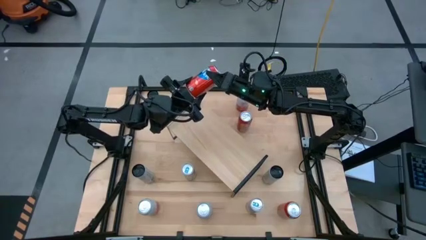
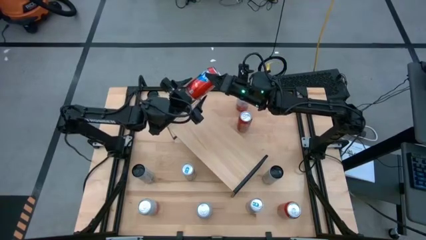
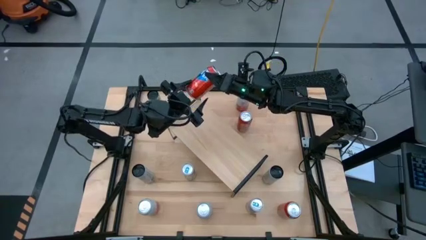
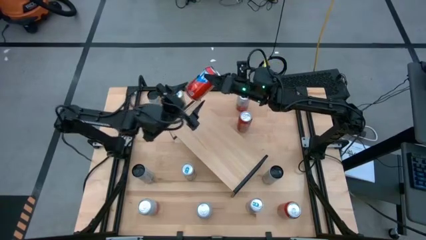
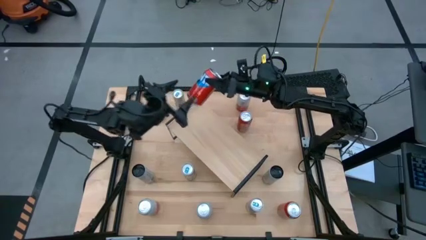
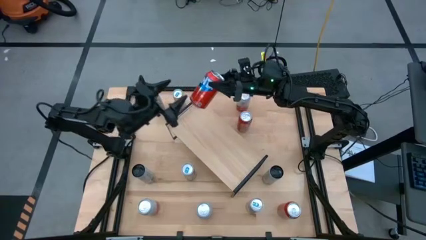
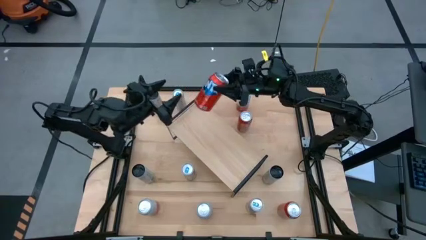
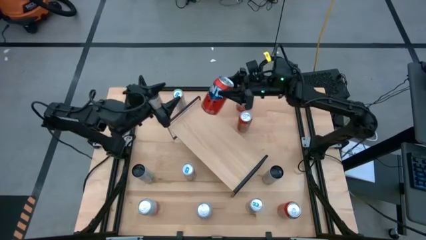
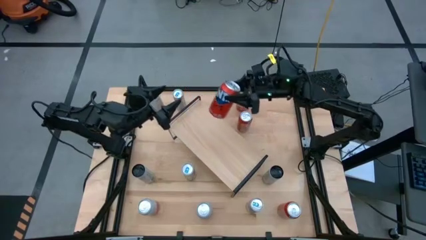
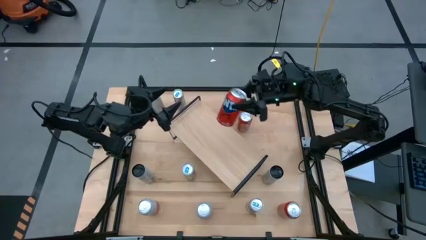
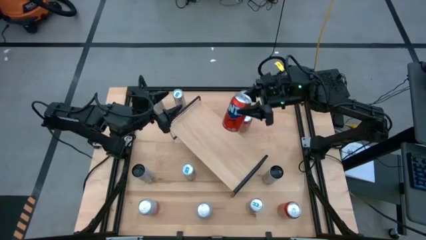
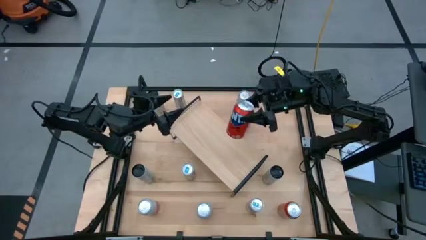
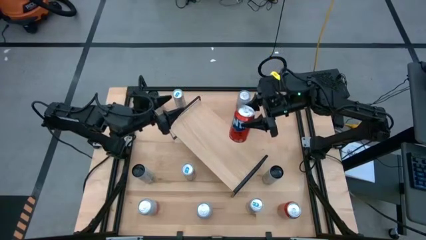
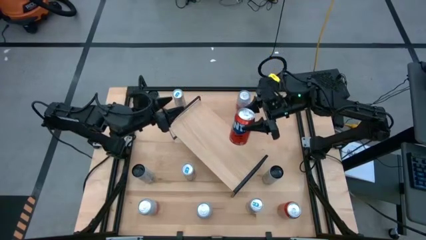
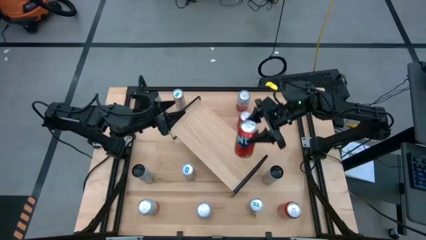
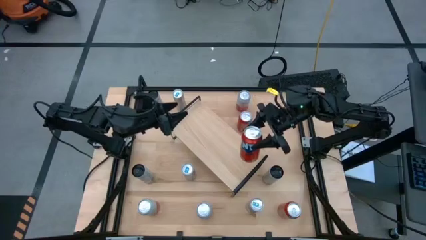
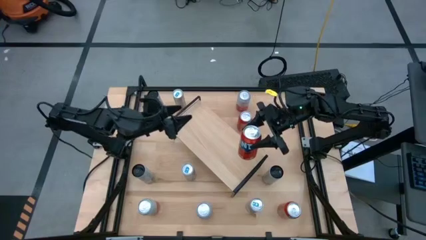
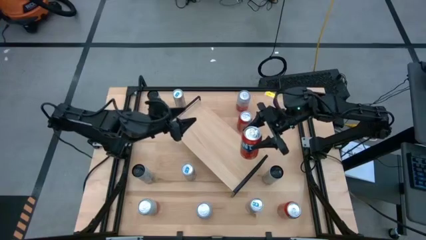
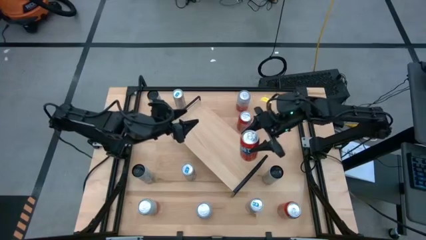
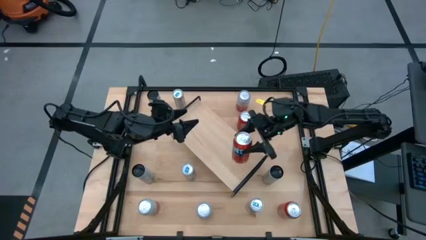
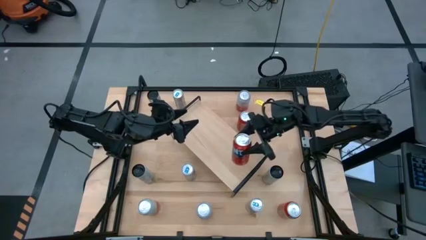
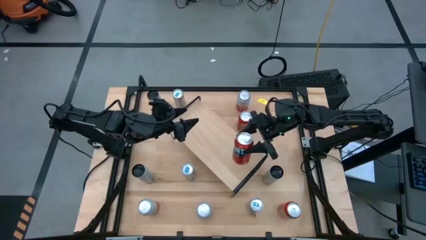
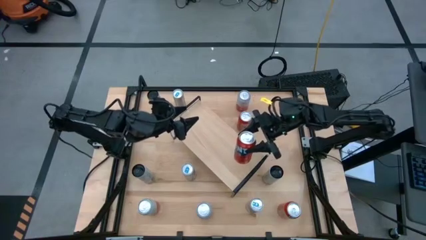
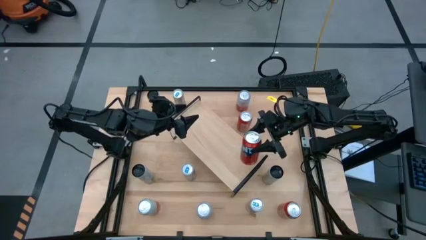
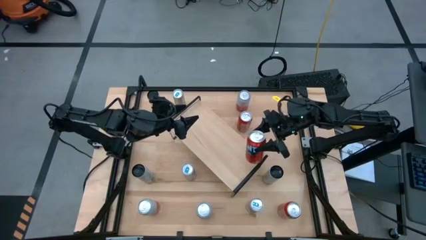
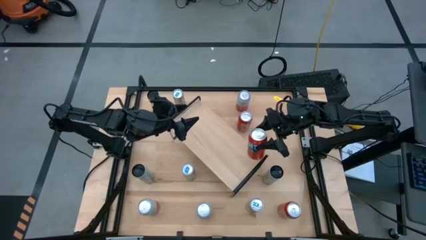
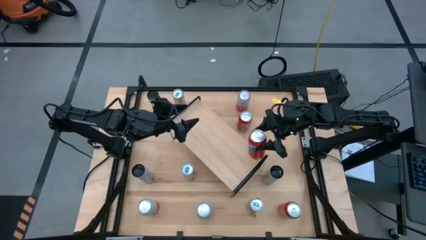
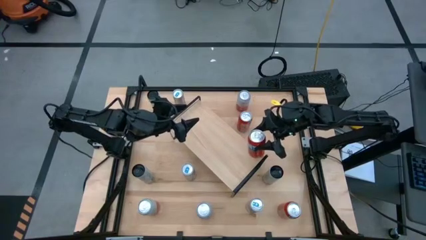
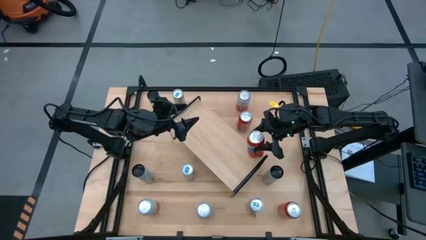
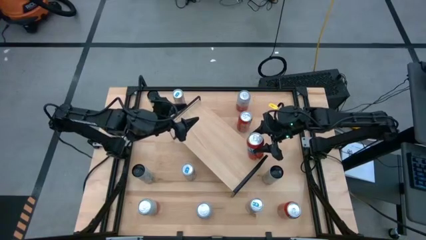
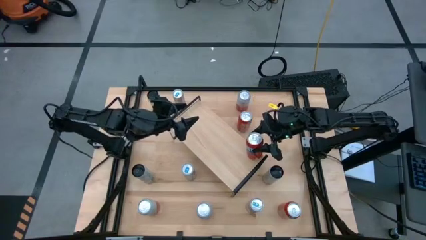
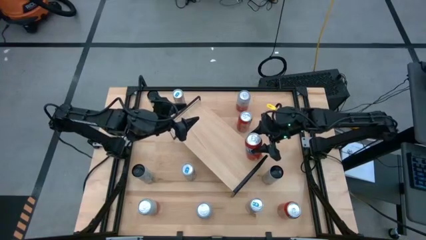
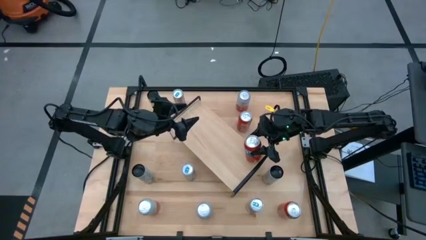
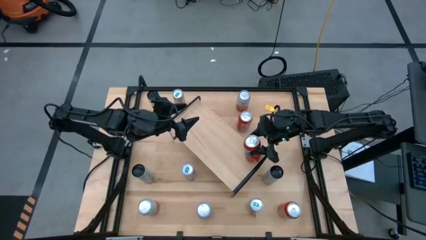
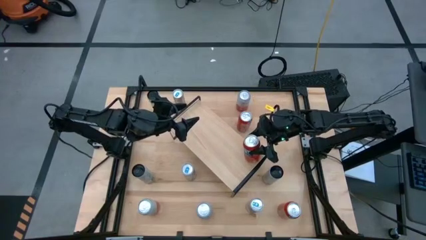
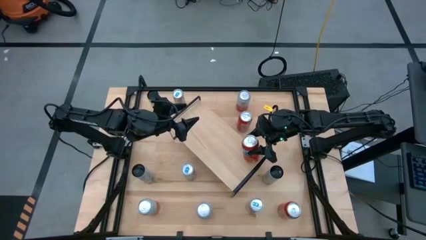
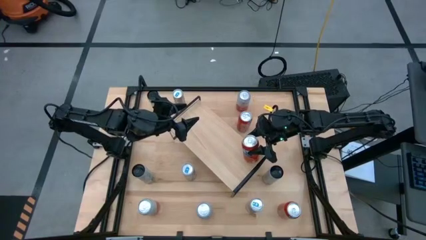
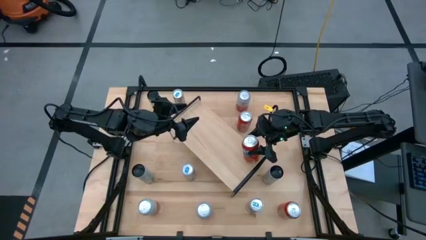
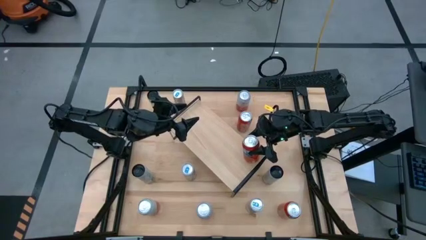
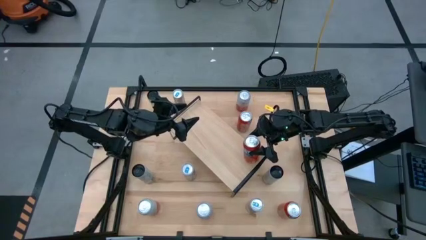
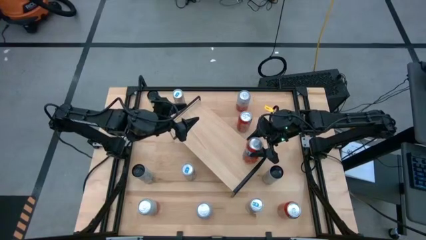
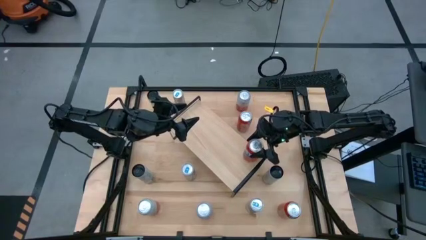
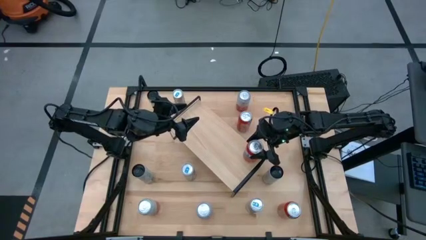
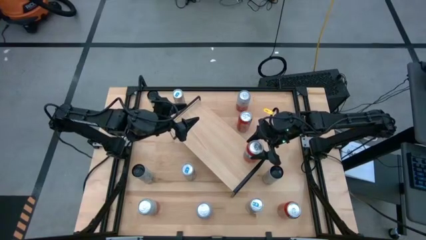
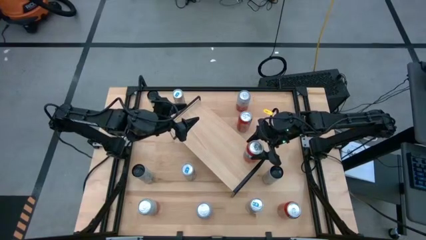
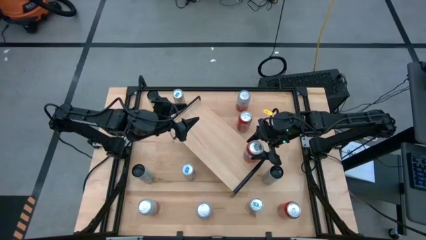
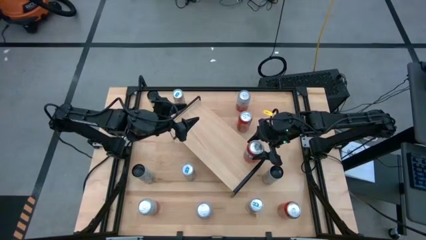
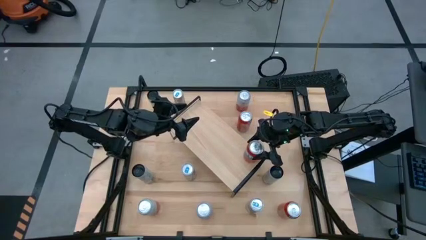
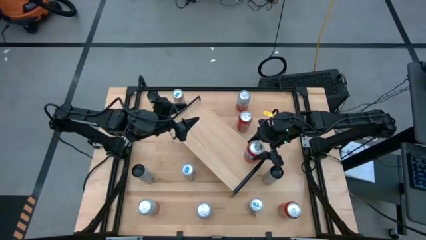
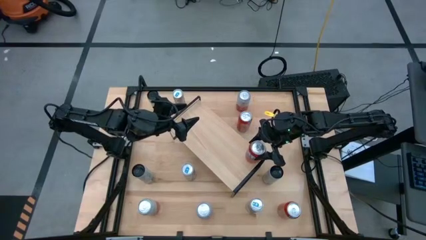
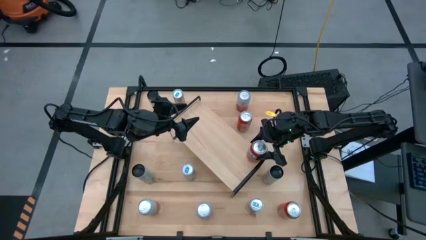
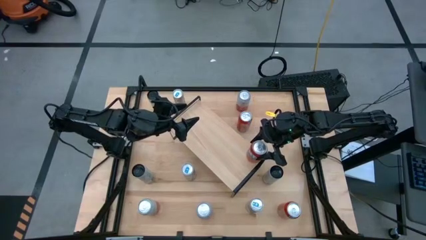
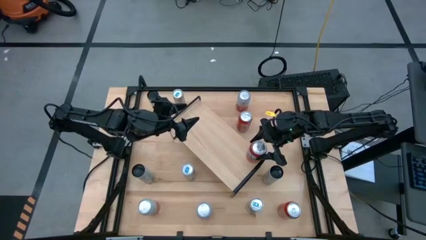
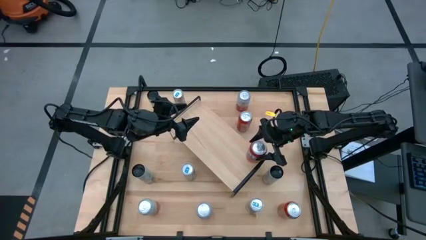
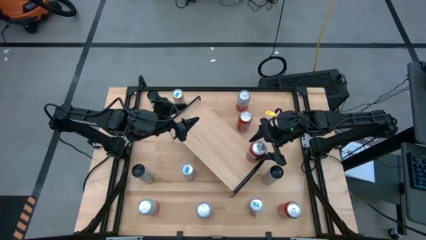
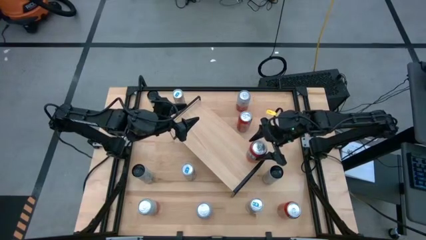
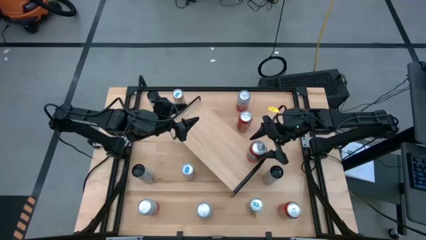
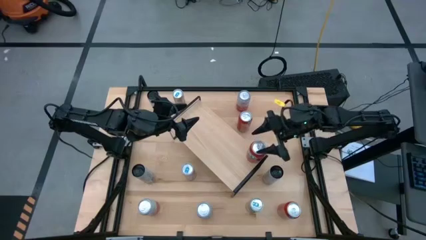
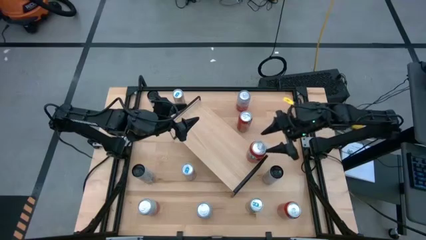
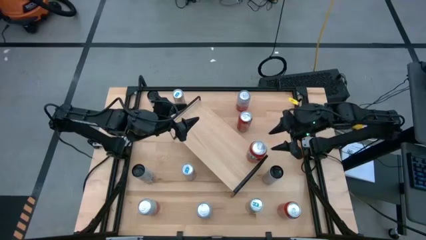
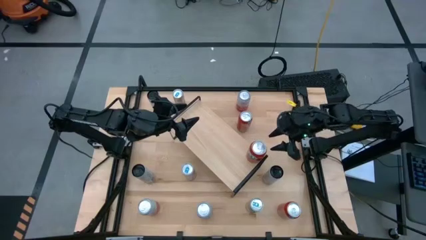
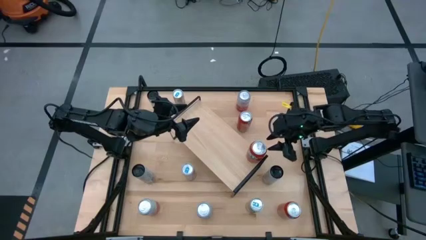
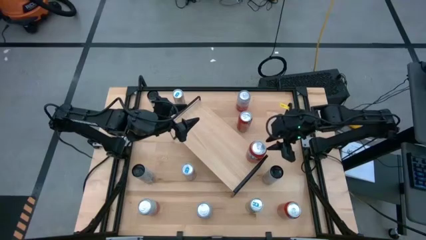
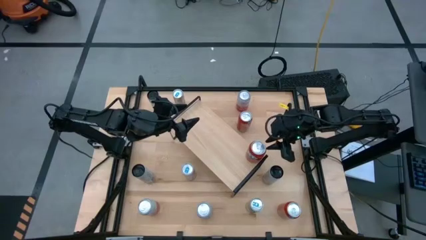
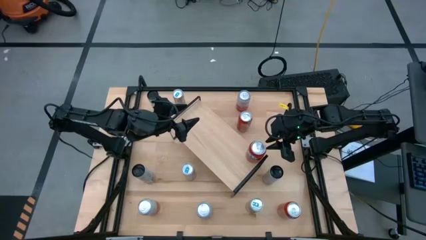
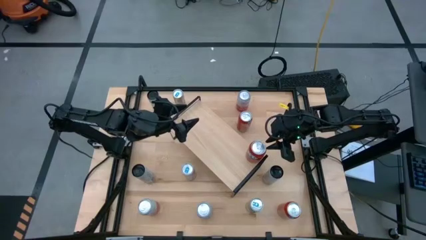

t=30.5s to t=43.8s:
Task: Place canned beverage on shelf
Put the top red soda can on the shelf

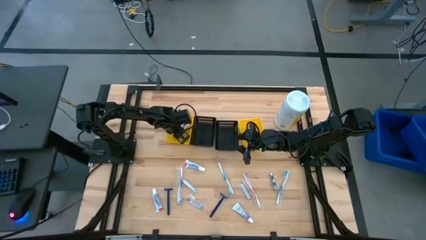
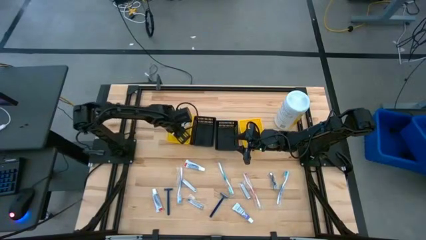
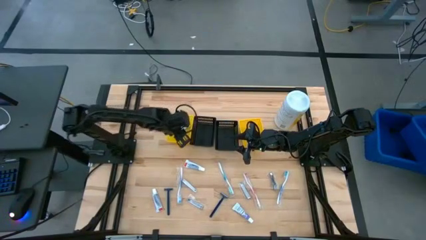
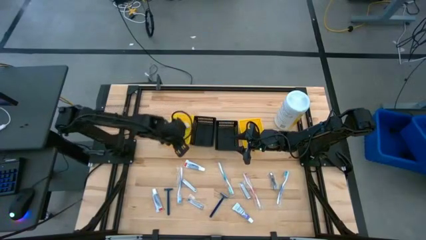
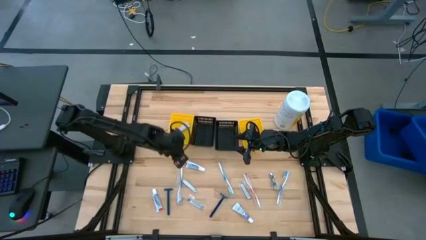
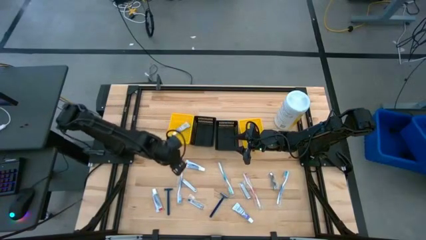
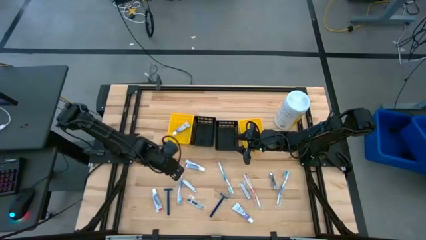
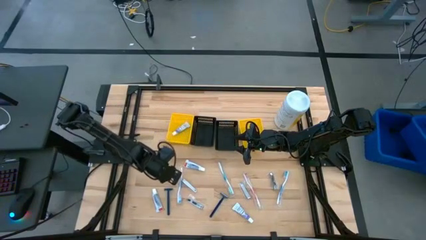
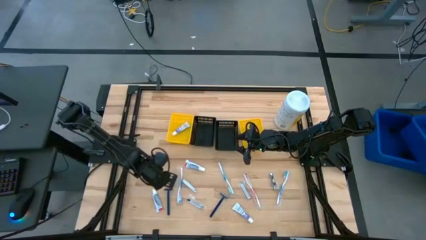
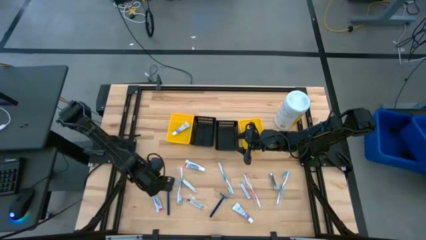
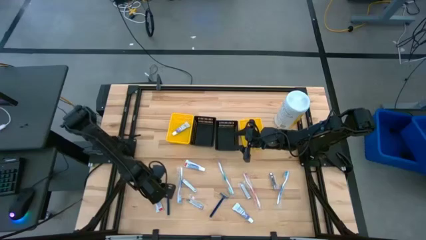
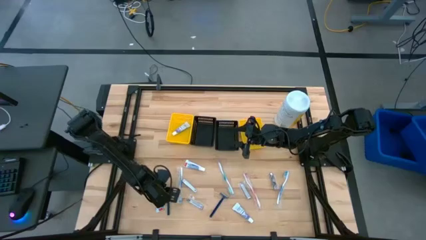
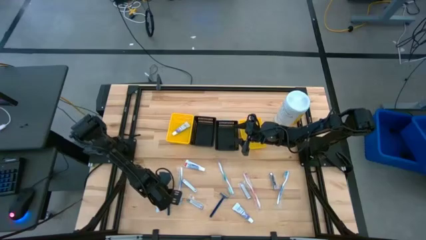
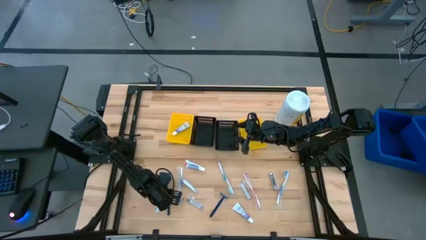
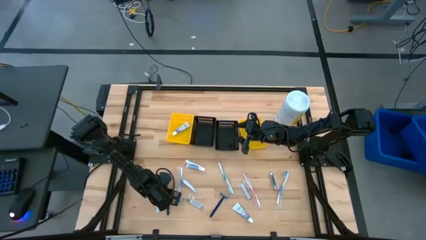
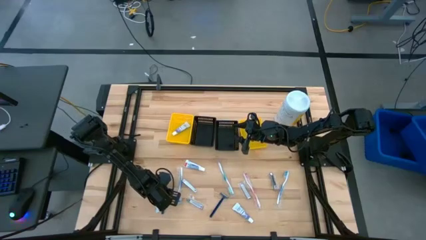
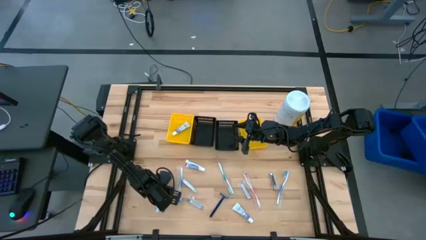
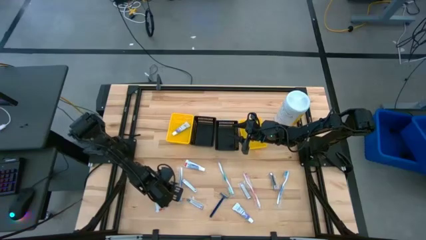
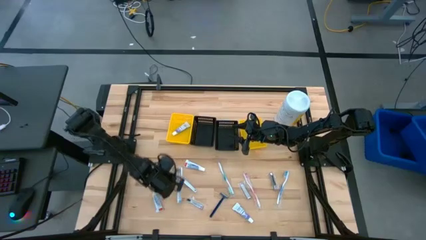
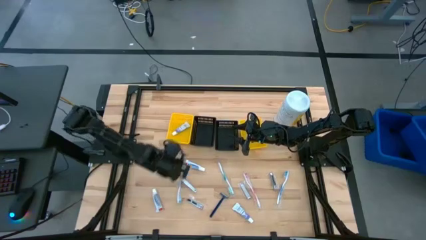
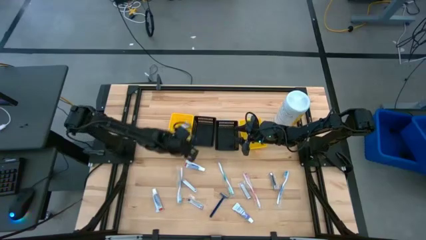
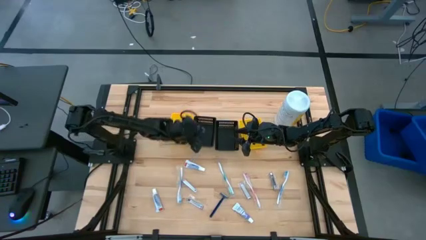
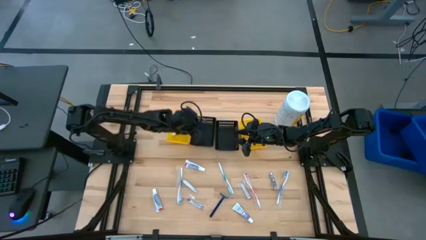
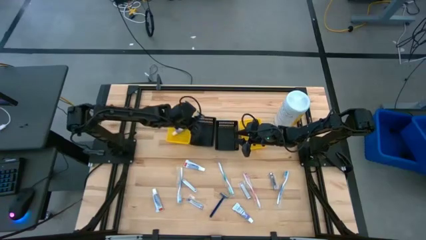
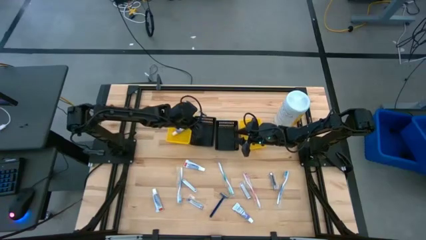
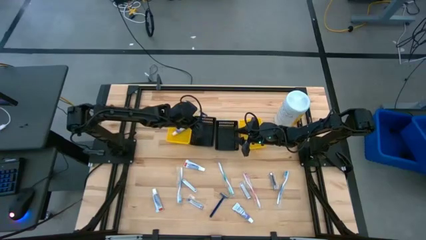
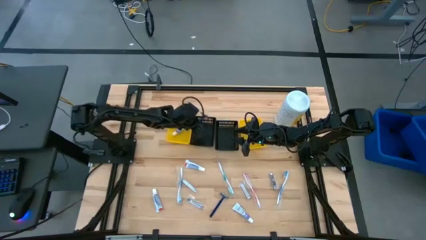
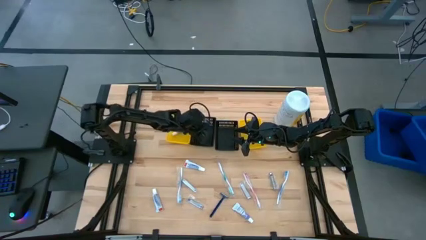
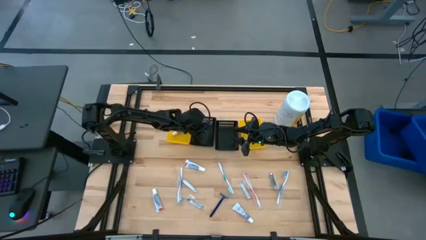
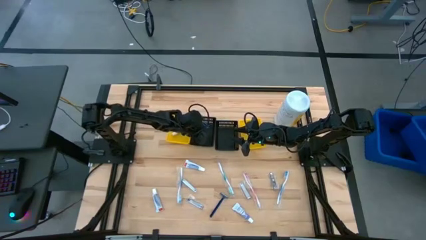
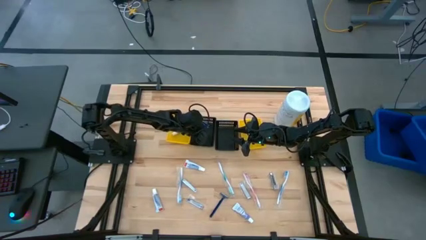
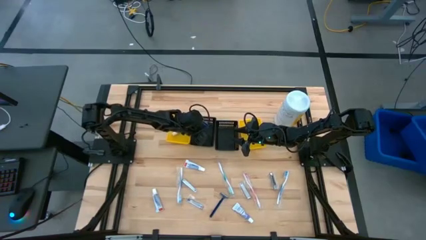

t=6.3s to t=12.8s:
Task: Pick & Place Travel size toiletries
Put the blue razor into the left black bin
